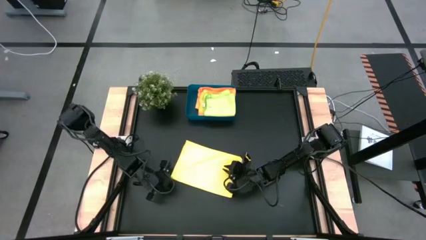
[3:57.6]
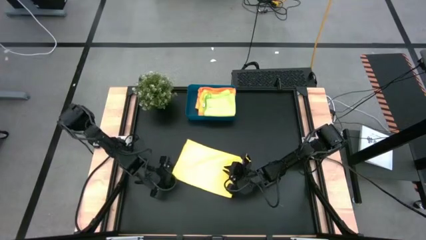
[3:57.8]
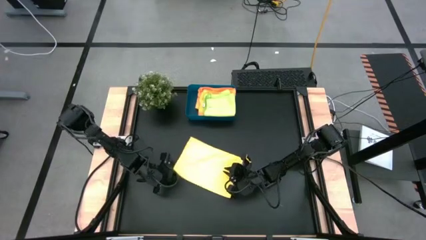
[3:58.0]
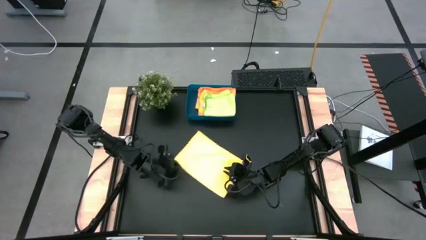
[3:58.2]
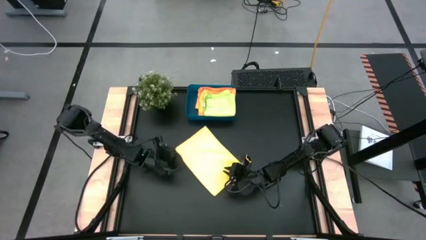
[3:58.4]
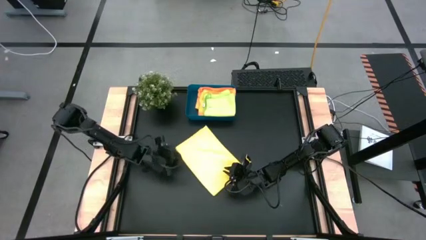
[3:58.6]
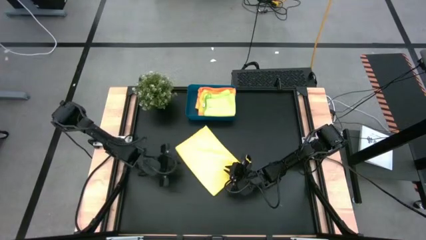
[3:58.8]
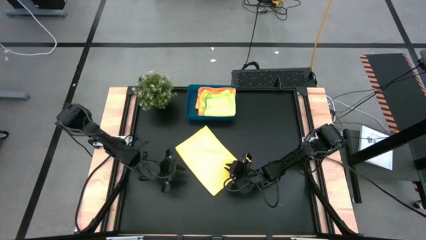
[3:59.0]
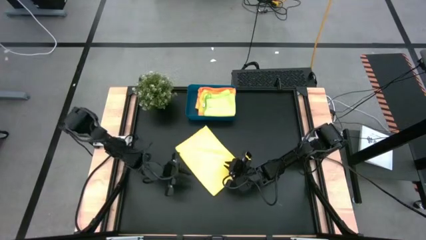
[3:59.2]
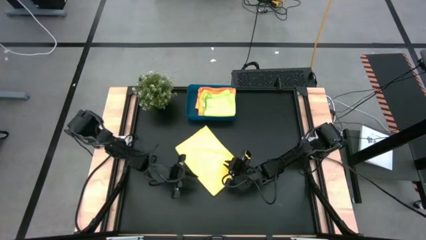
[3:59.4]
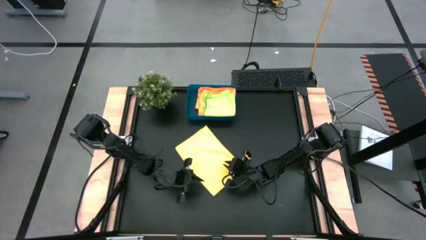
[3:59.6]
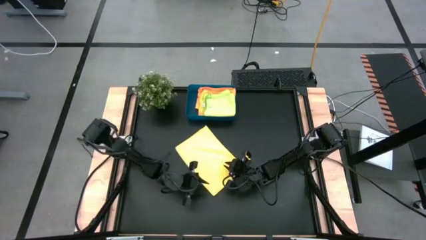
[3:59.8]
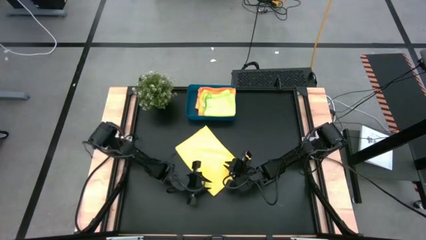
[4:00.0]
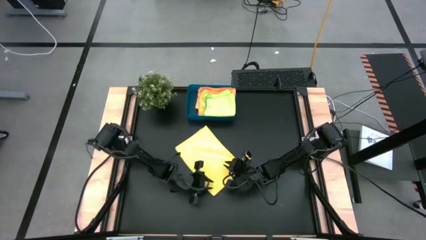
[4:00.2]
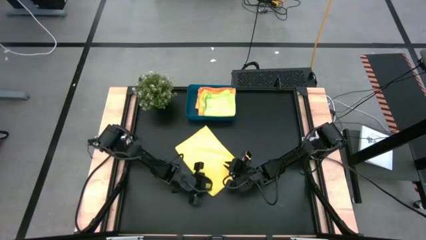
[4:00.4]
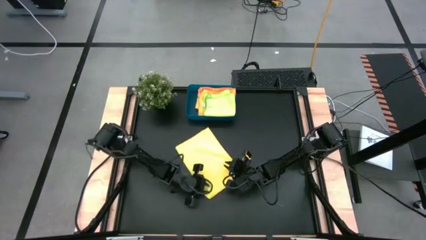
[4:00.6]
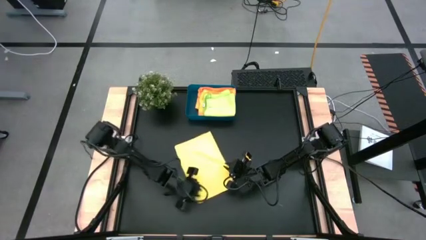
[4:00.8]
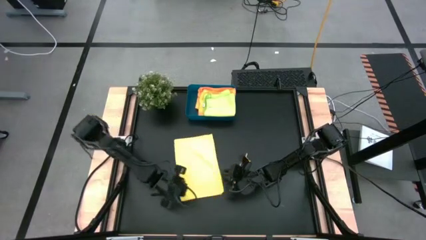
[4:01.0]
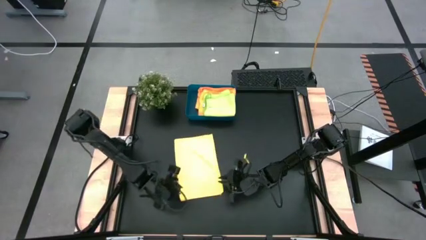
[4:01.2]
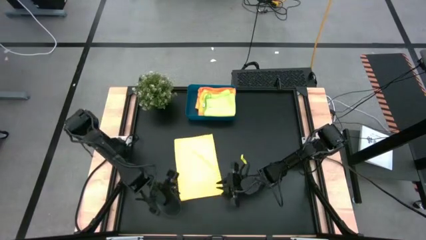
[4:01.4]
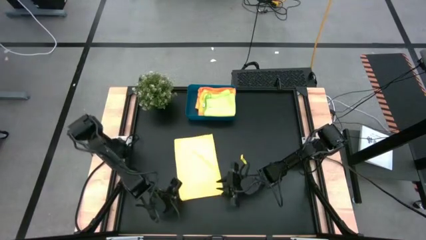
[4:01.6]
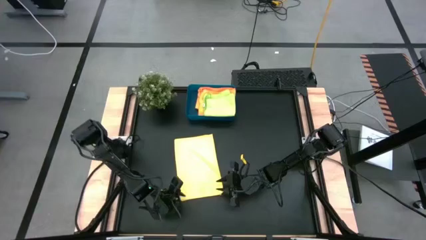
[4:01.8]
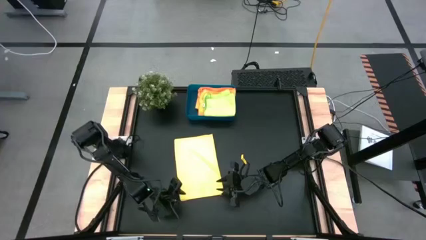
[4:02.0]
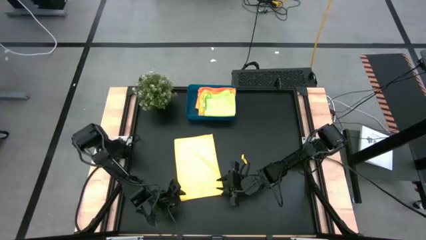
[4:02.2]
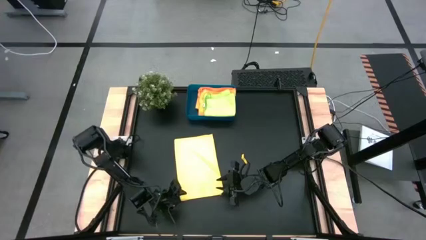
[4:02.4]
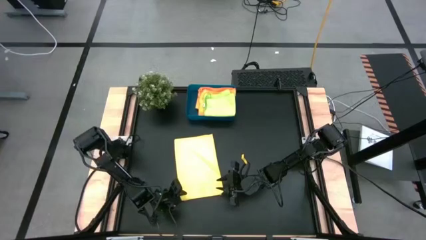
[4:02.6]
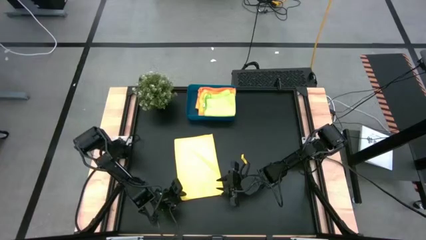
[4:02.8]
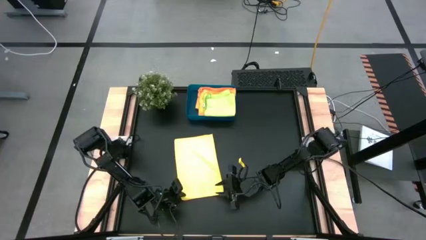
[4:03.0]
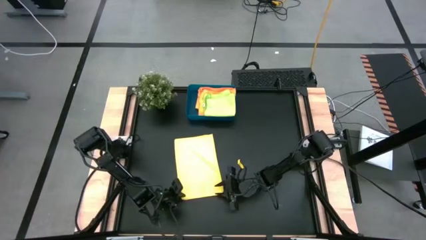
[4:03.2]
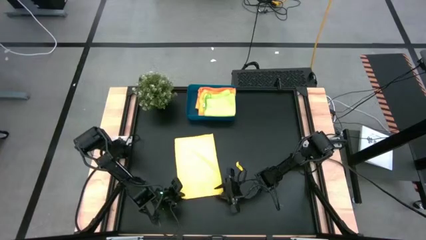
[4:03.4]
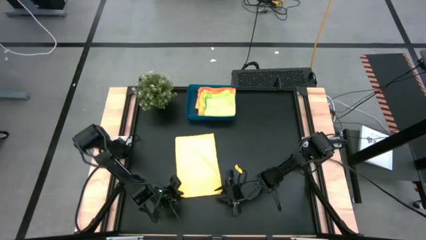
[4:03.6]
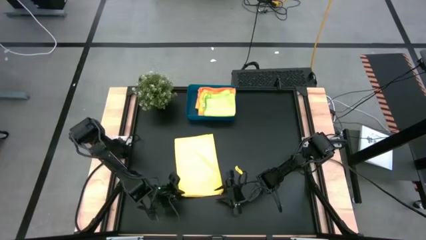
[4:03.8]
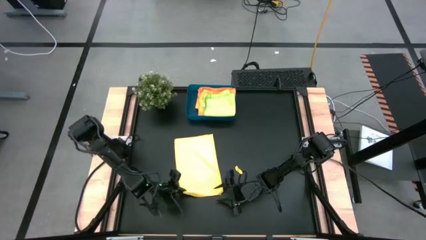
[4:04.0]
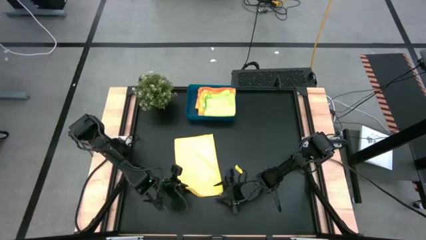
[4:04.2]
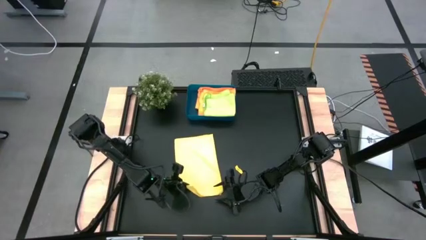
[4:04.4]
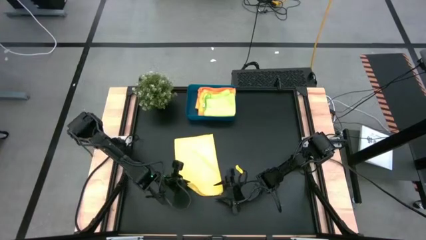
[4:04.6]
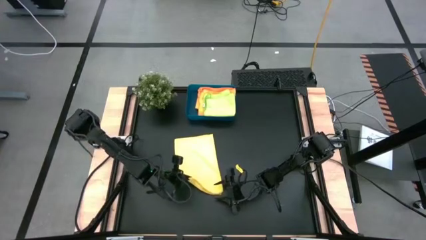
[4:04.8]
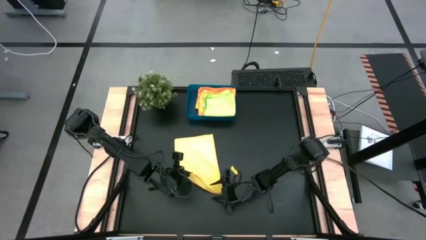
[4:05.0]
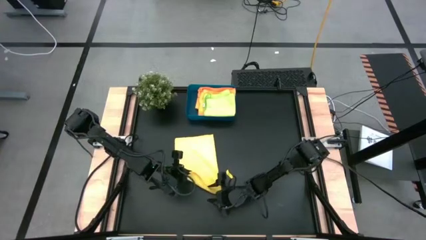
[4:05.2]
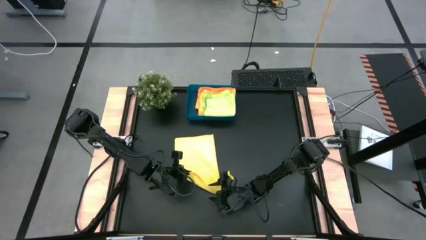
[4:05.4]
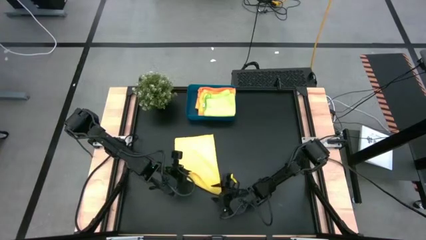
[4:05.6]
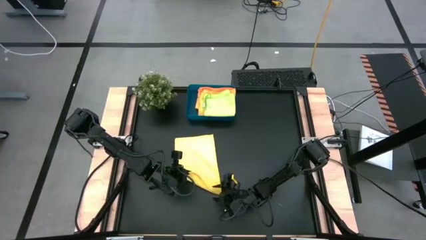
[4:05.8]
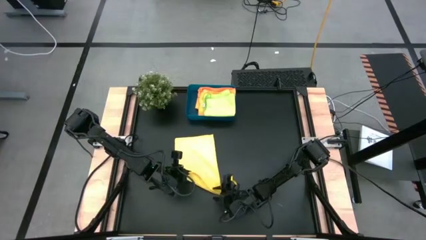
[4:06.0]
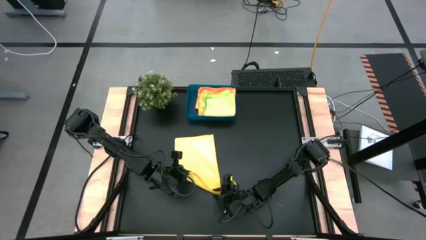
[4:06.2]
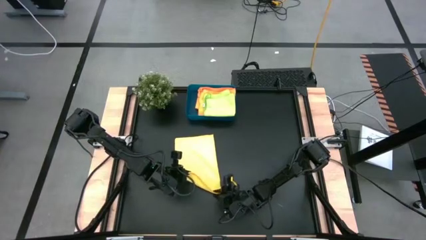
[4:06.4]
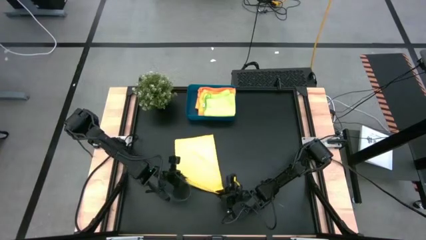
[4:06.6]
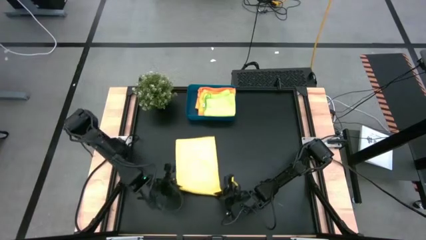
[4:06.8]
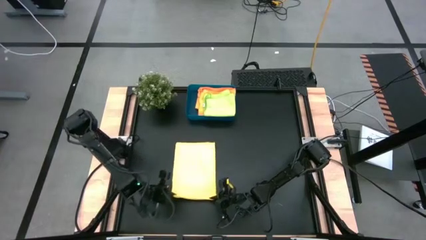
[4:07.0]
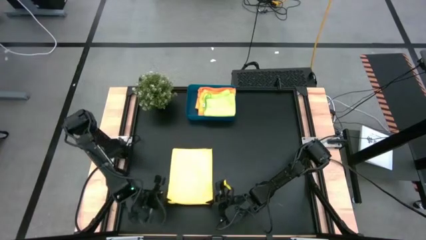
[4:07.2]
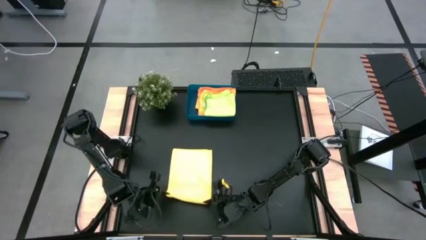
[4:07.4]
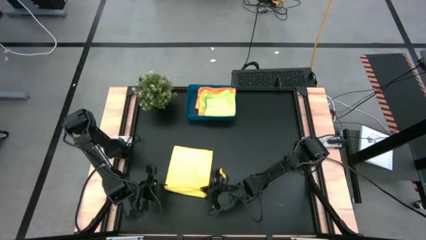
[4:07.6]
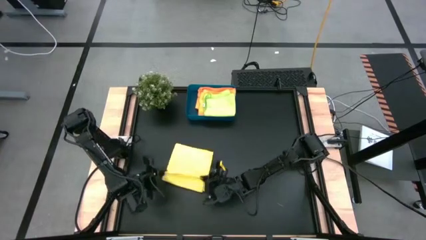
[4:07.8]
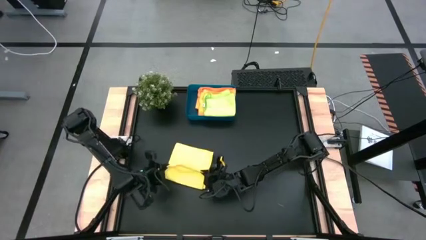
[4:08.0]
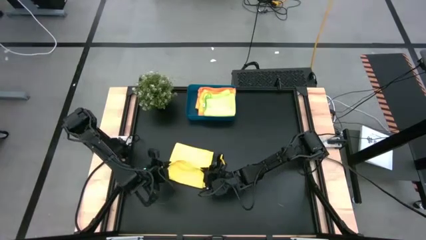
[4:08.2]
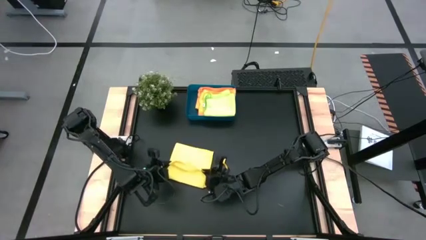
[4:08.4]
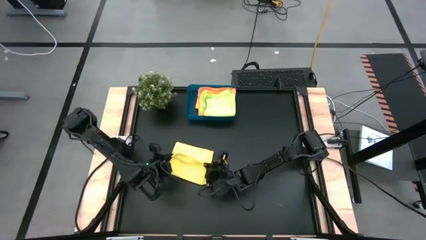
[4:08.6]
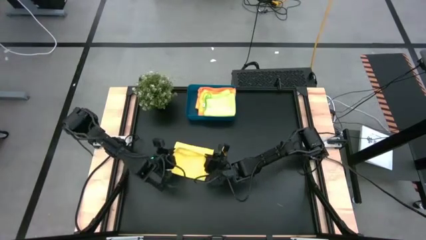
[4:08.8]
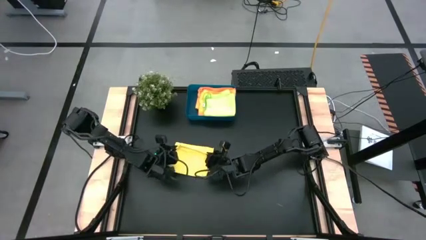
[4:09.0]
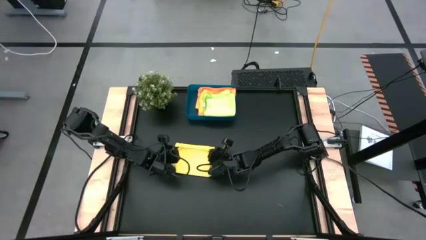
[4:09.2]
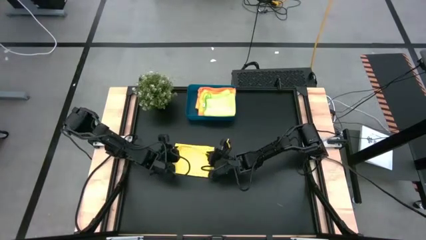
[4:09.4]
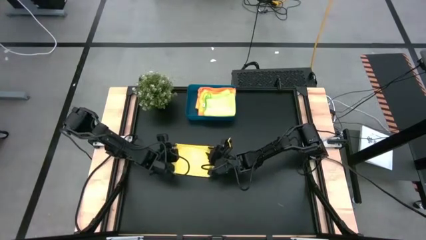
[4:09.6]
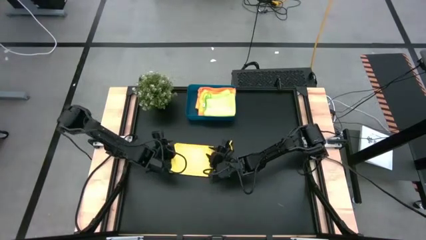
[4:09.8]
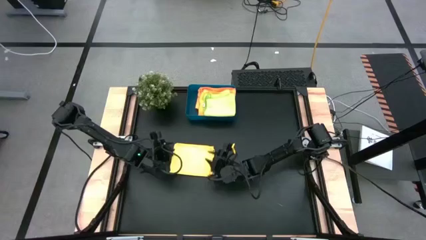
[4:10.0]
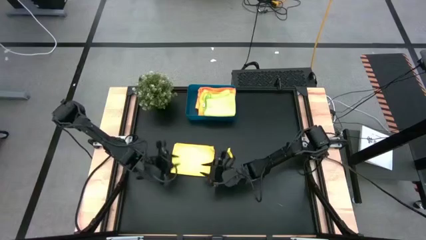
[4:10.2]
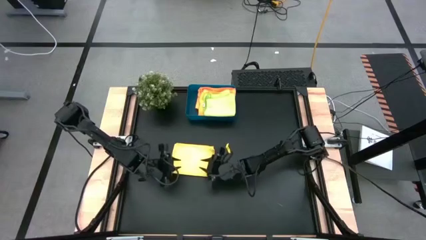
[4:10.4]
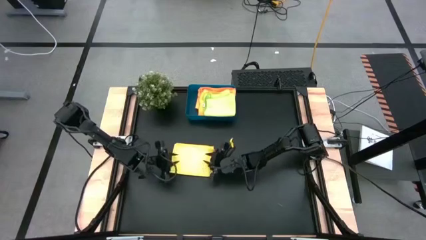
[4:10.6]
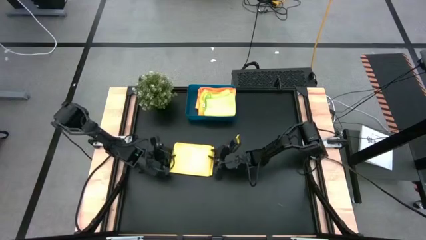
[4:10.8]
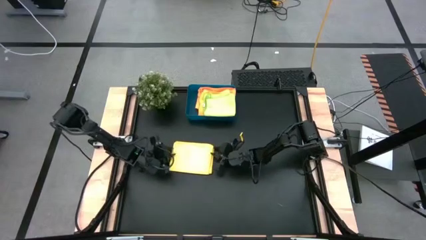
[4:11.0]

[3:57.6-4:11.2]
Task: Fold microfiber towels
Fold the yellow microfiber towel

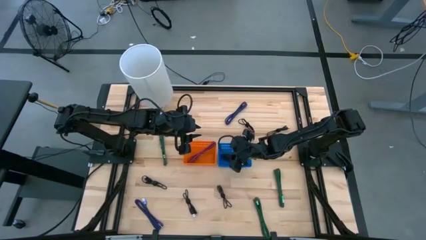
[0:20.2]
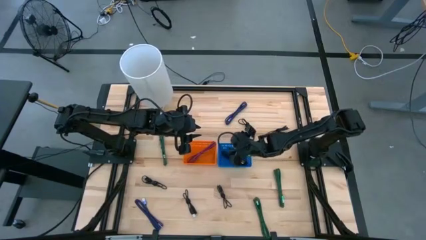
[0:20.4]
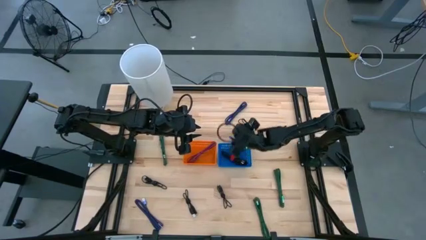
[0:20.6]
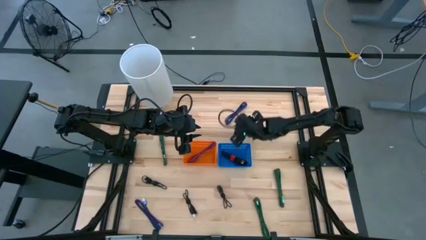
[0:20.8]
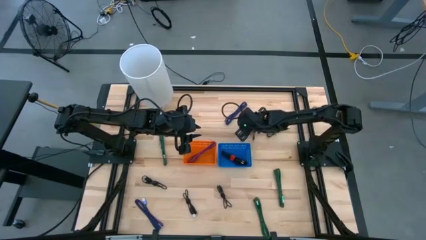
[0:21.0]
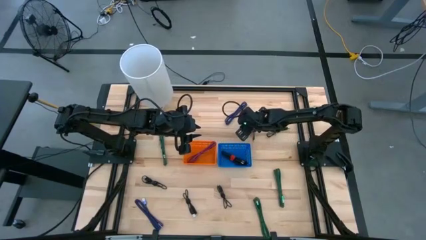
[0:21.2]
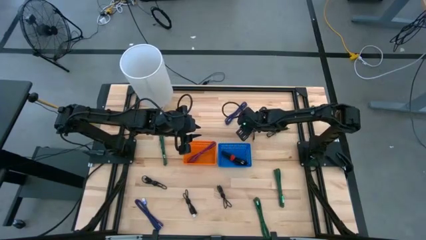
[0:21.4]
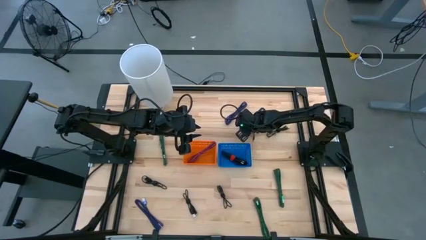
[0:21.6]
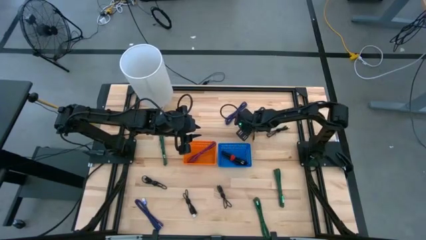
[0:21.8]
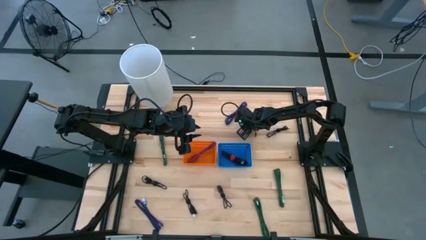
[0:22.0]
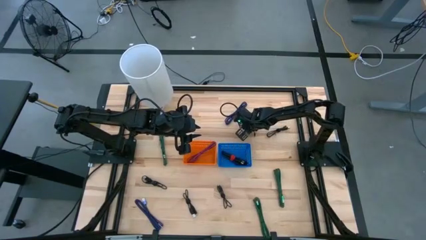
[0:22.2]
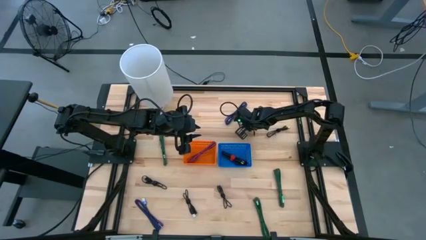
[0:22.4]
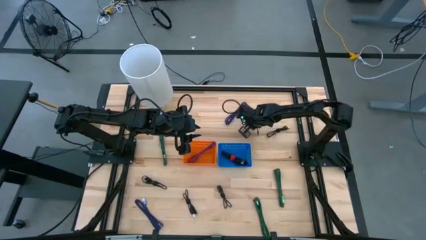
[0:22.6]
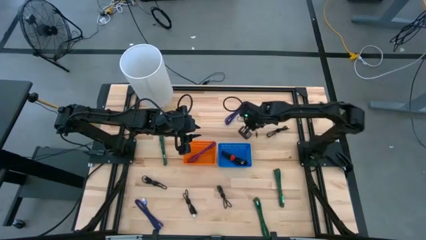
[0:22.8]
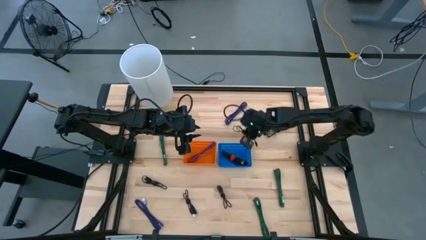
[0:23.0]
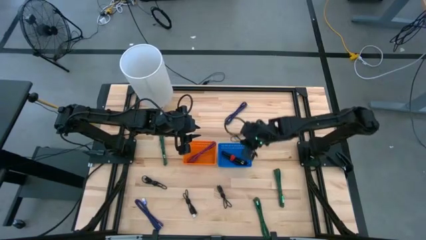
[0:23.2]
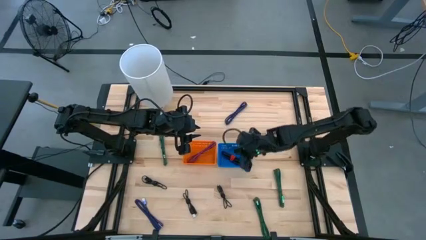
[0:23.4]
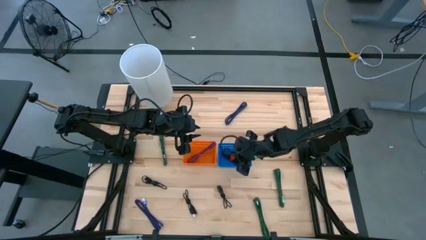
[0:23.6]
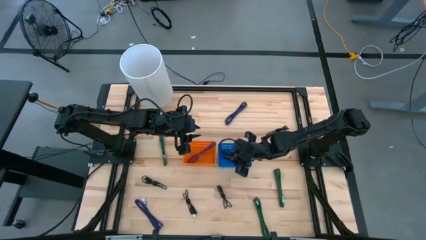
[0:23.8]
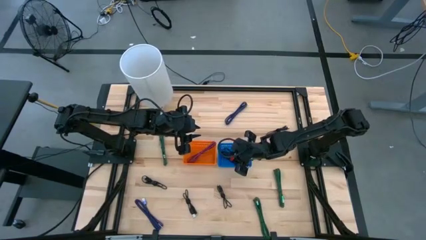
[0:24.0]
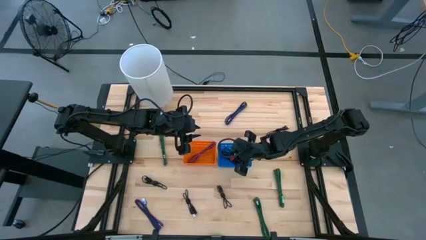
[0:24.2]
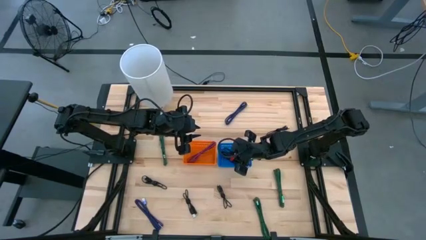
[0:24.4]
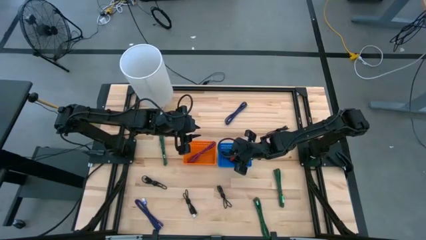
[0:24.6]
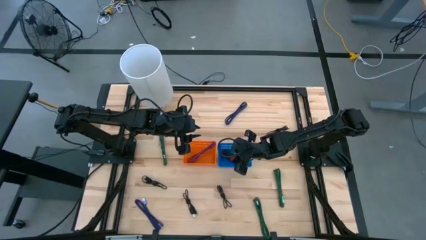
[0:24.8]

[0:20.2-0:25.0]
Task: Pick & Place USB Port
Put the black charger cable into the blue bin
